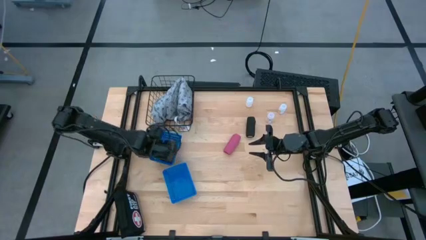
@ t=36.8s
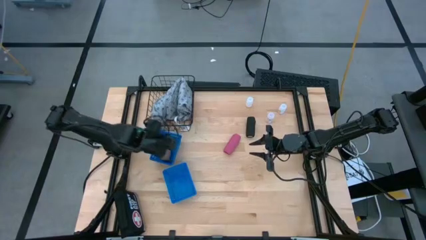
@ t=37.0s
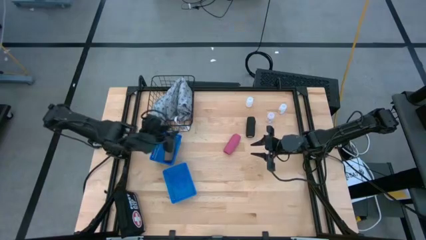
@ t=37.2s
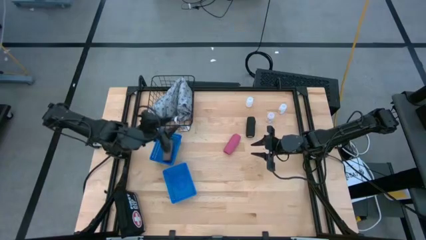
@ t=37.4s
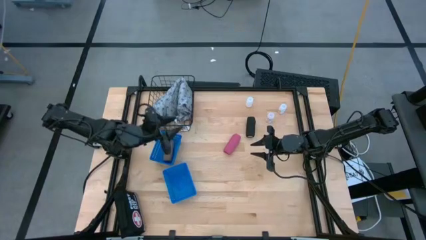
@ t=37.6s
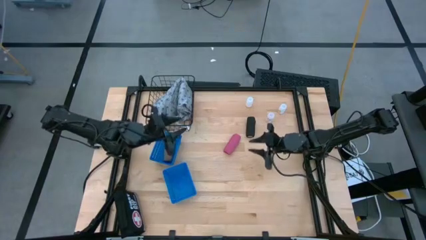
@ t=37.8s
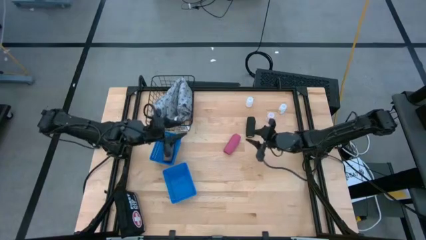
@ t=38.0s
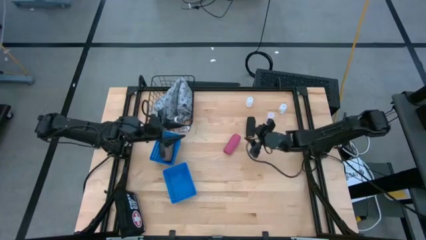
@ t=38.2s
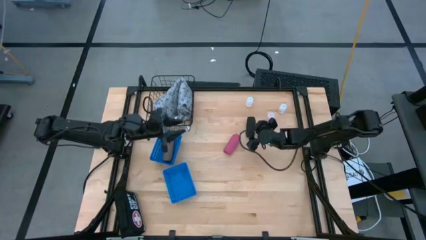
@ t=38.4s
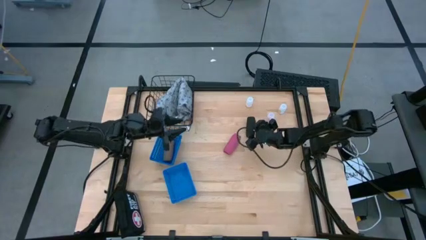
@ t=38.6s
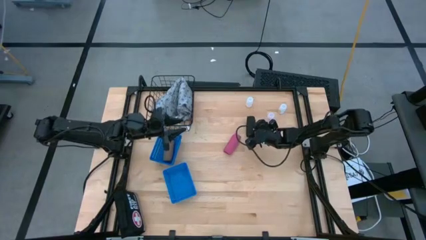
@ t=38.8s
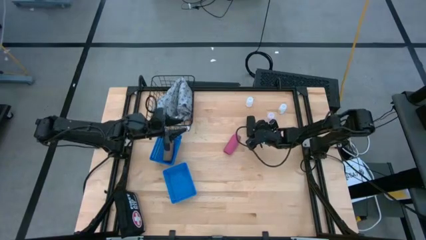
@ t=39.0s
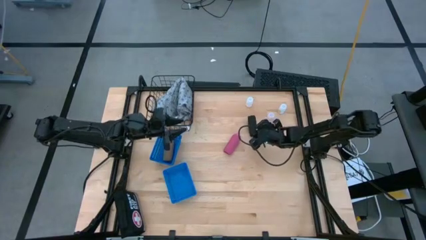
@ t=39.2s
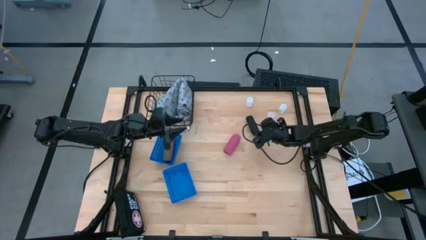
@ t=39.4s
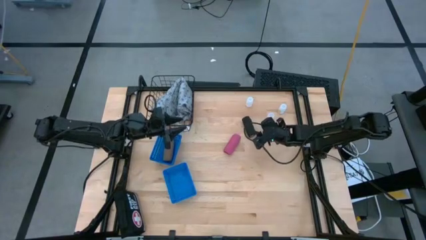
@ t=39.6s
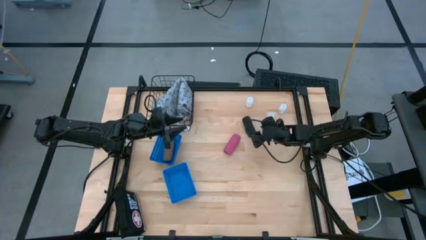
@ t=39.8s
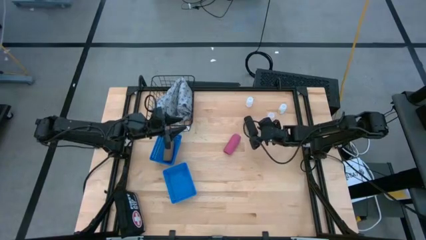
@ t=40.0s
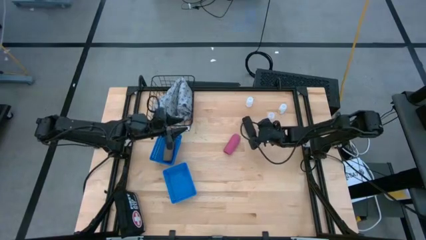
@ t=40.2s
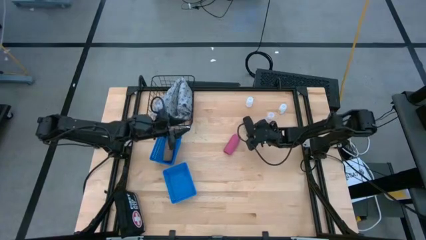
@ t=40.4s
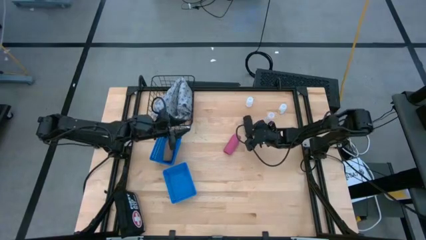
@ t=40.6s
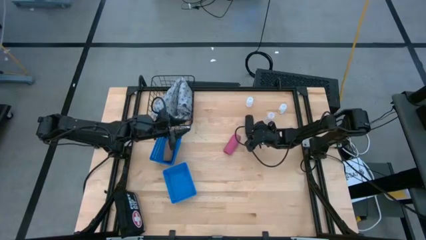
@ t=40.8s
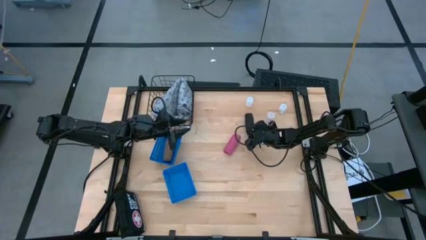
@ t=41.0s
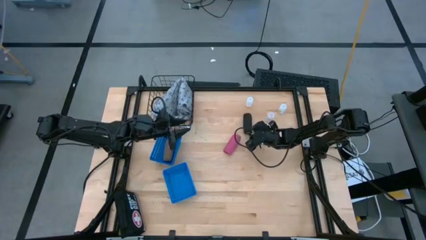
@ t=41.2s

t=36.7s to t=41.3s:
Task: Pick & Place Medicine items
Put the black bandage into the top blue basket

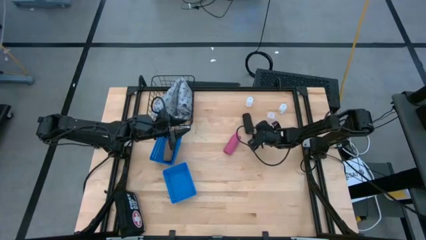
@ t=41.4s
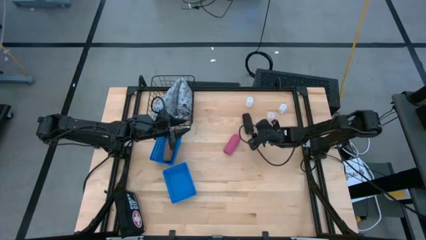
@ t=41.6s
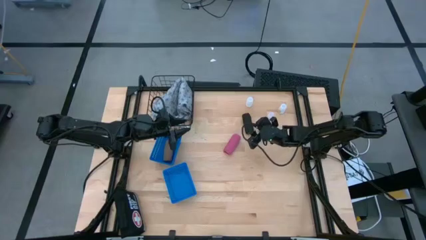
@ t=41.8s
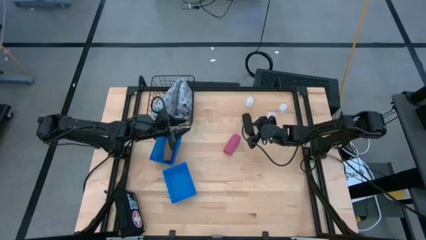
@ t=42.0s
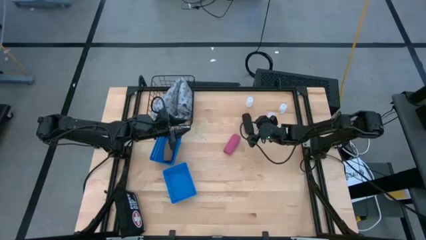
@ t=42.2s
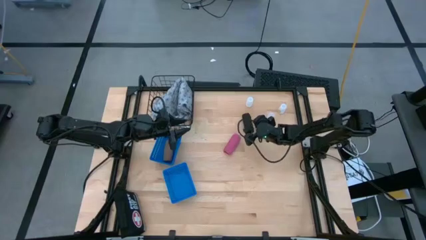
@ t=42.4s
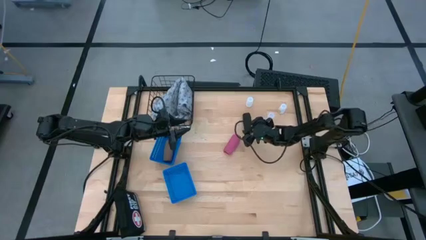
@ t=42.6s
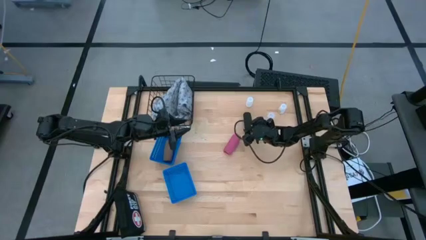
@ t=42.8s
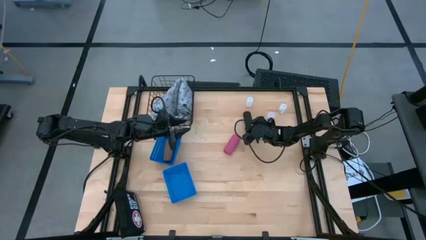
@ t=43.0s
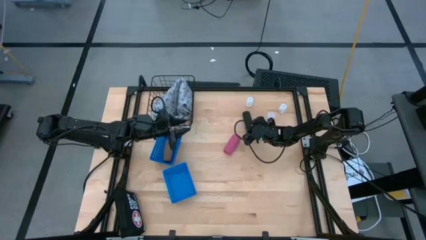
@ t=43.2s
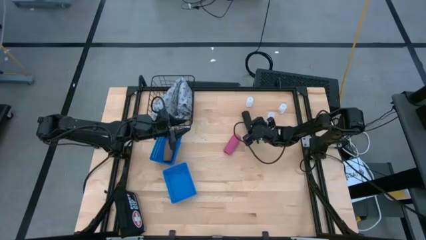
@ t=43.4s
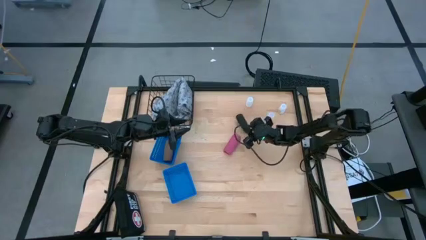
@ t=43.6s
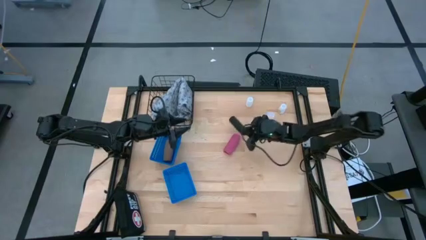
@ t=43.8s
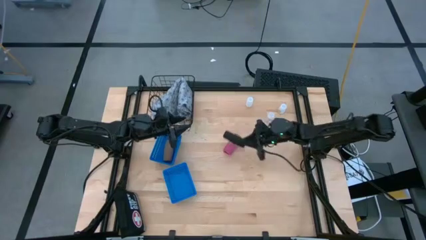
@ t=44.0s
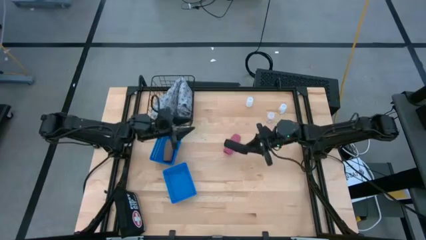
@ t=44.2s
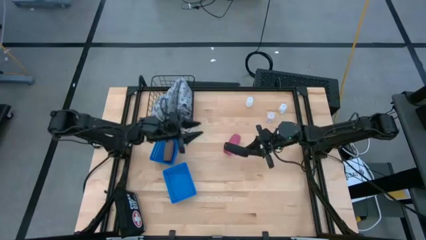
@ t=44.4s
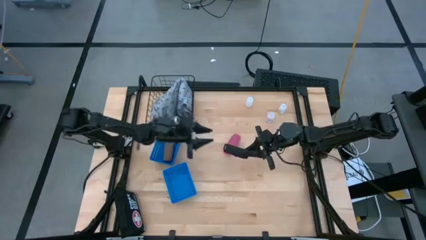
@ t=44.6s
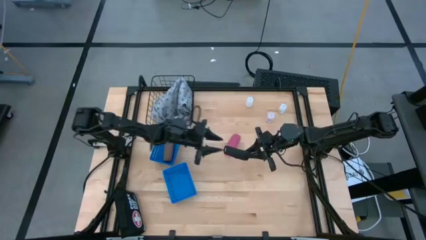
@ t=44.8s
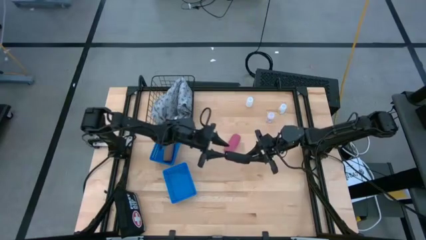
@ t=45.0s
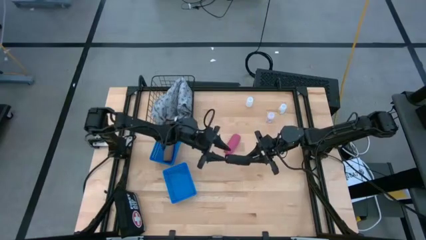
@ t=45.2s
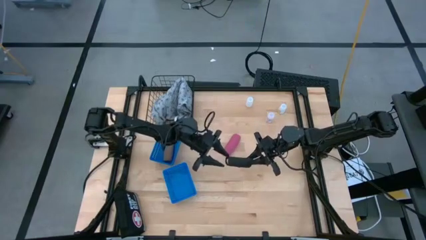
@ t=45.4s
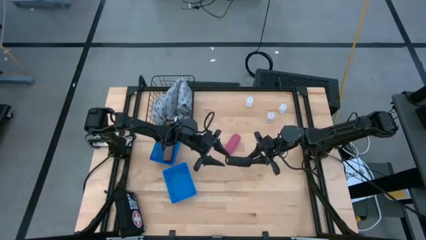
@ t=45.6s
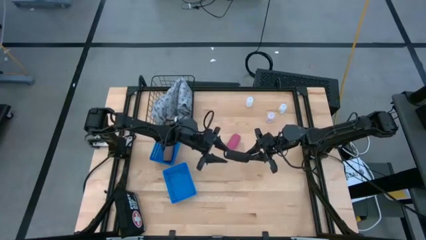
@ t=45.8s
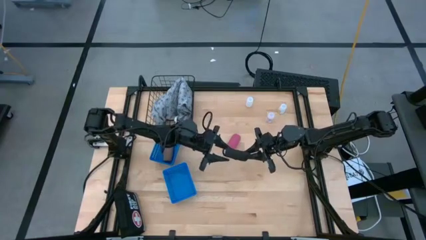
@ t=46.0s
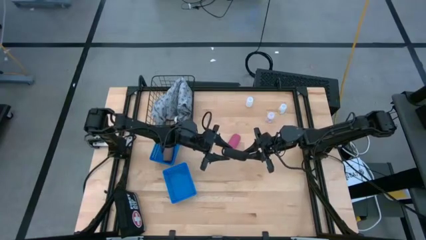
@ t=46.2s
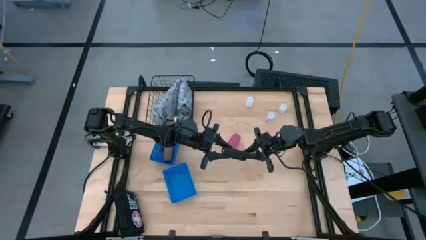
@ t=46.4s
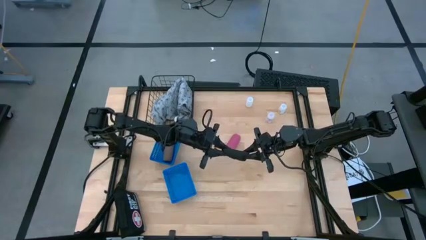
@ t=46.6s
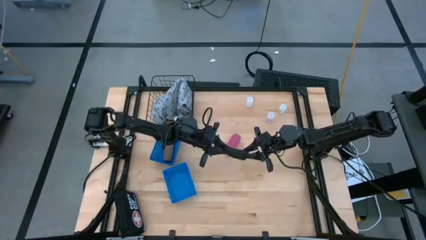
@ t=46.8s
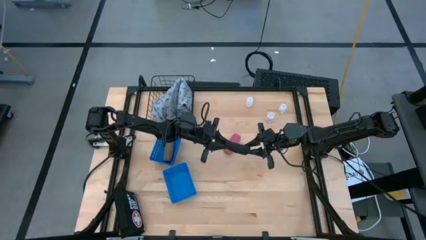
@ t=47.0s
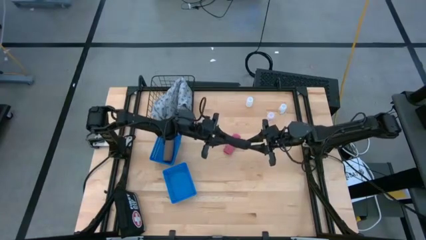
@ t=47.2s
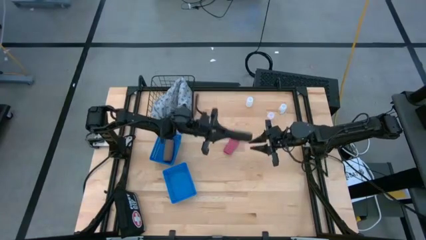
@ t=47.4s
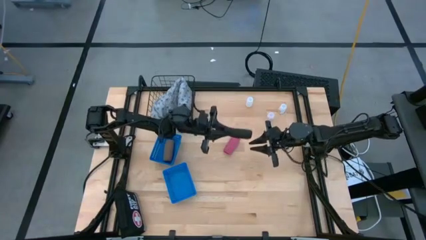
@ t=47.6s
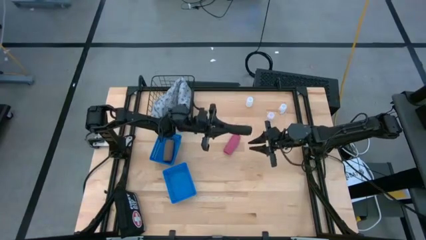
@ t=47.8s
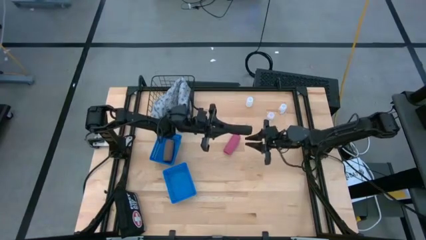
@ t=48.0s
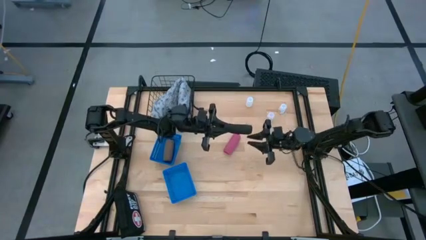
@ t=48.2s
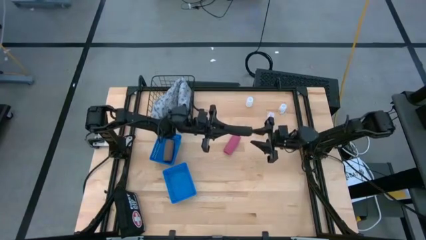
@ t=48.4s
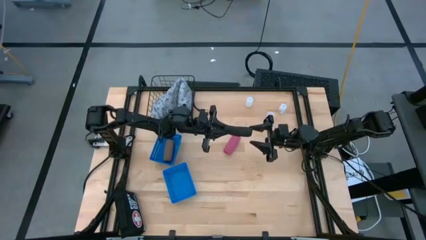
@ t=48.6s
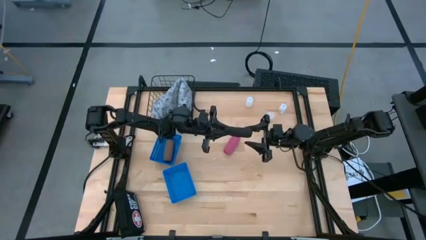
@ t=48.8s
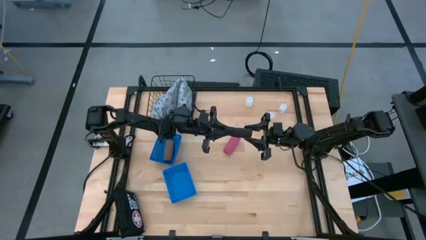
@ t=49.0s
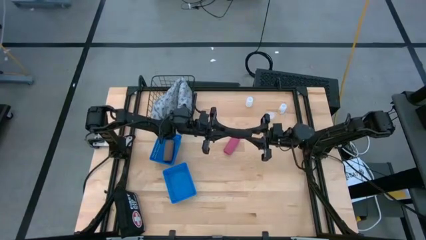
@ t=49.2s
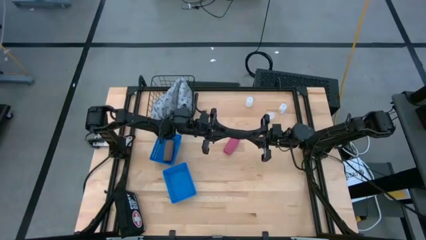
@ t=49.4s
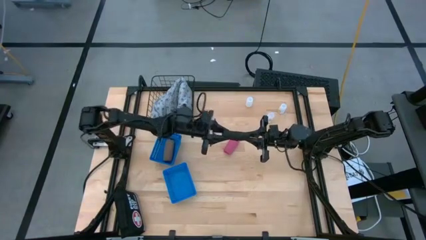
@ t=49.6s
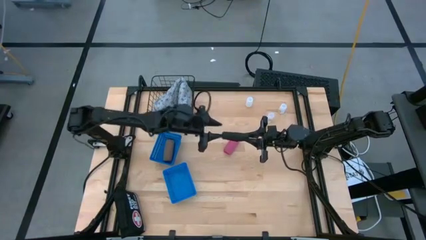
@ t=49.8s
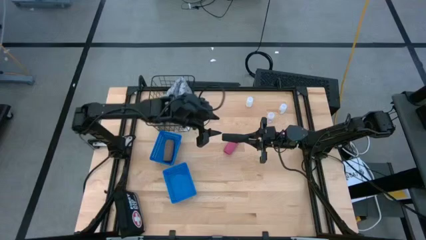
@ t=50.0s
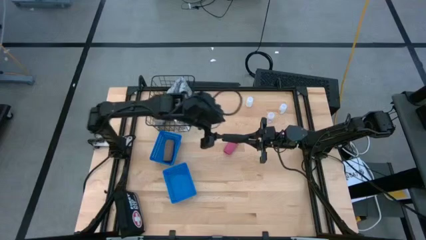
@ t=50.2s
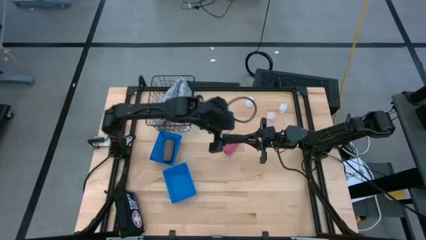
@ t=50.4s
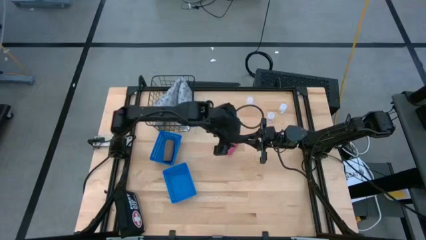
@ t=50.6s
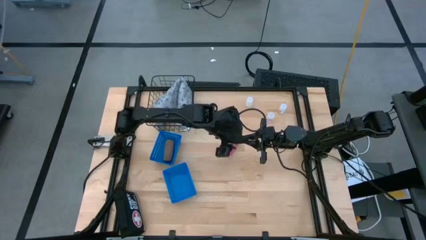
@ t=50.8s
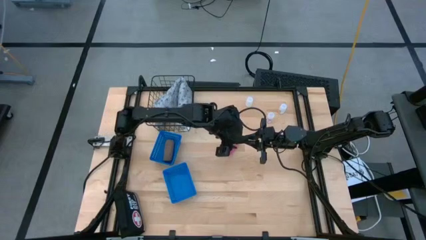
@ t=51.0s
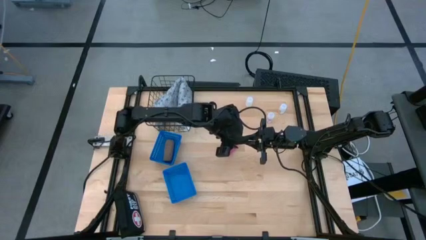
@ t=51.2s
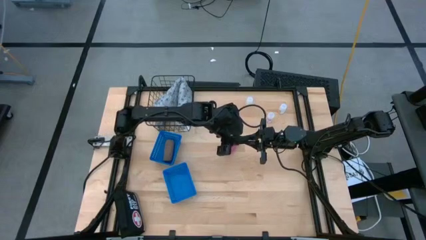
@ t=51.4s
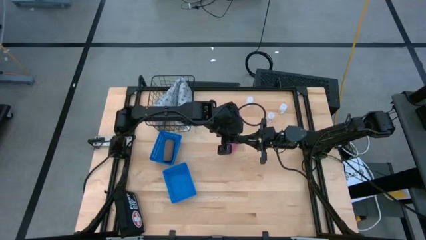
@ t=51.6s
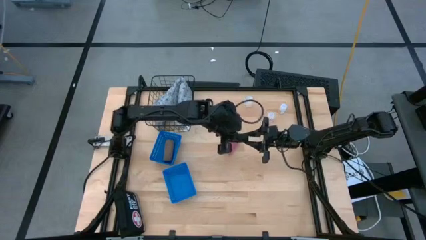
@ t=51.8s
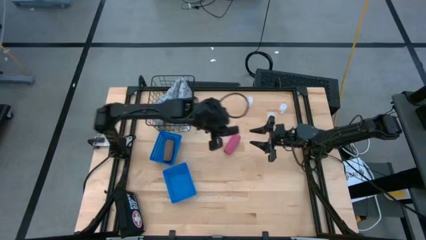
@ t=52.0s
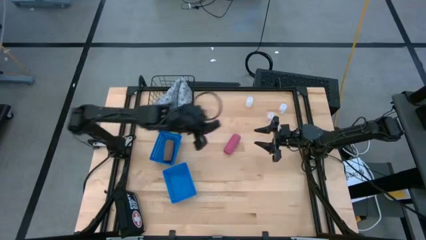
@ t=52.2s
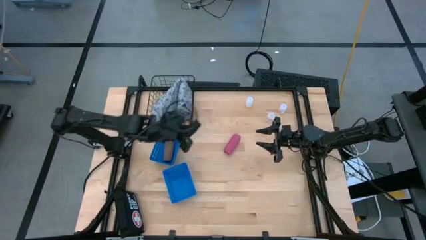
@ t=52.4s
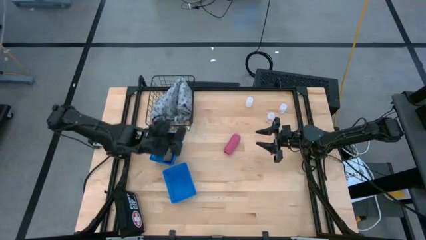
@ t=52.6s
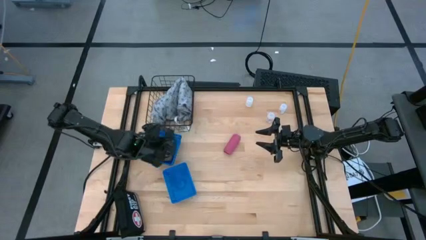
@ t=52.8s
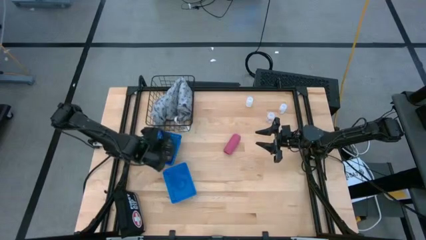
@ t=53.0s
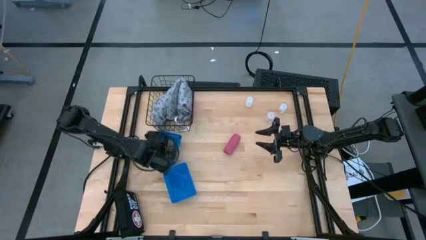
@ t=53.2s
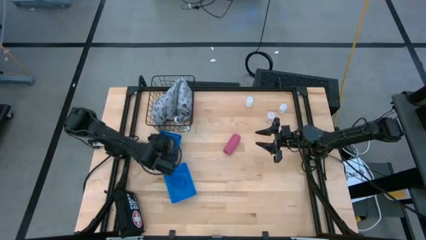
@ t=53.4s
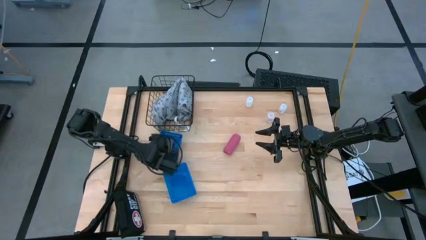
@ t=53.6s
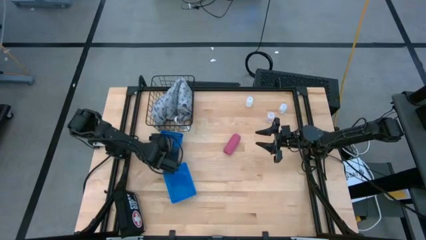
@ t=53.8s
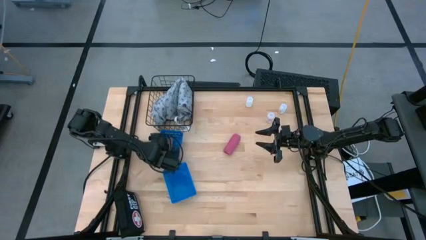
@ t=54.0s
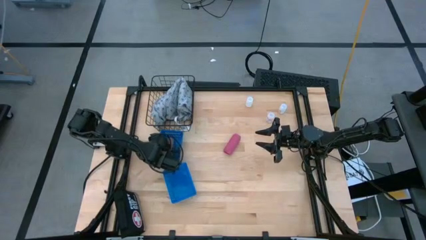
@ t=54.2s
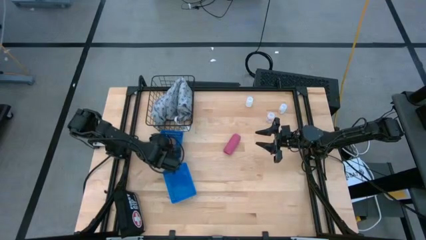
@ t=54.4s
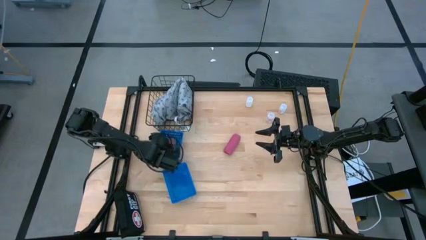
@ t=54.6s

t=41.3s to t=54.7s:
Put the black bandage into the top blue basket
